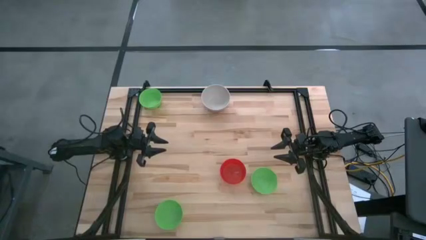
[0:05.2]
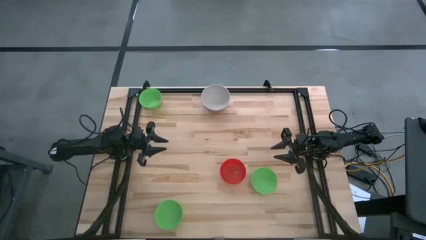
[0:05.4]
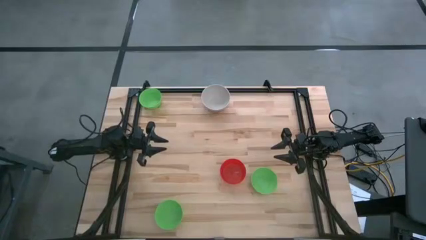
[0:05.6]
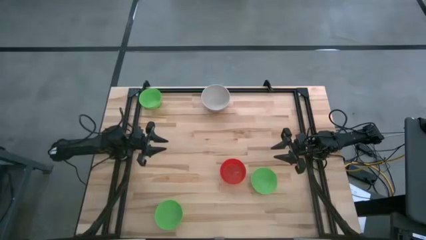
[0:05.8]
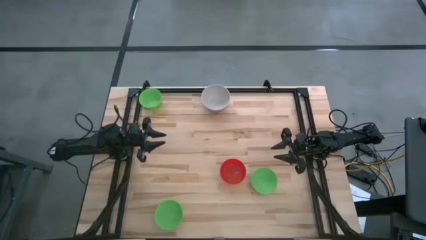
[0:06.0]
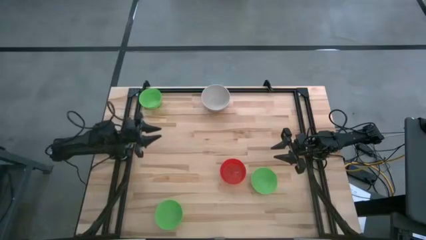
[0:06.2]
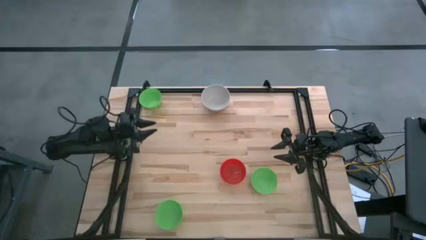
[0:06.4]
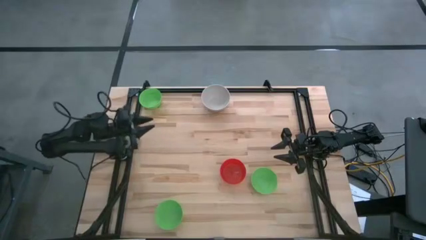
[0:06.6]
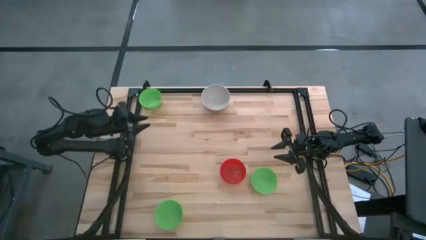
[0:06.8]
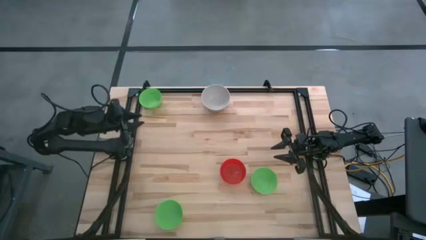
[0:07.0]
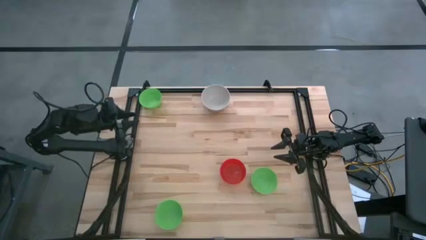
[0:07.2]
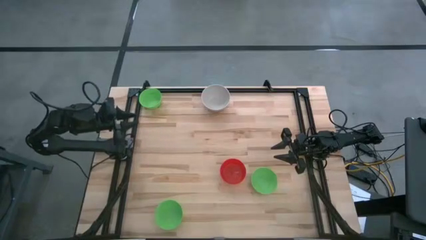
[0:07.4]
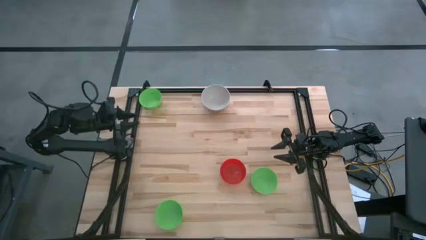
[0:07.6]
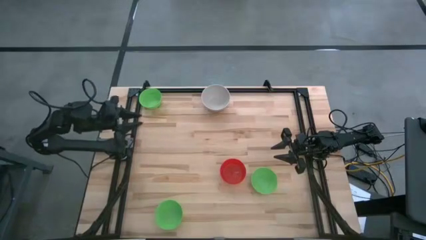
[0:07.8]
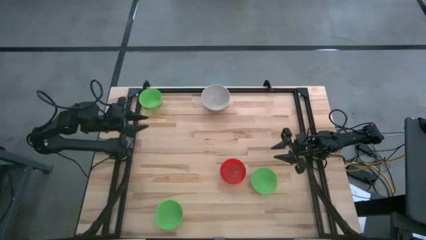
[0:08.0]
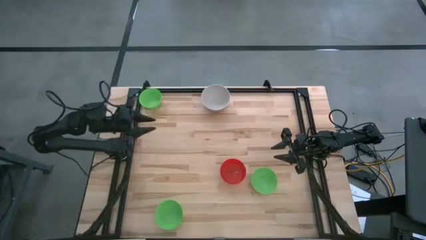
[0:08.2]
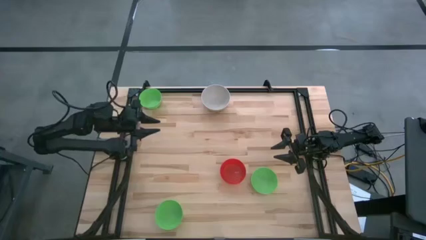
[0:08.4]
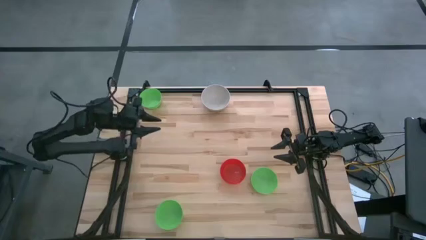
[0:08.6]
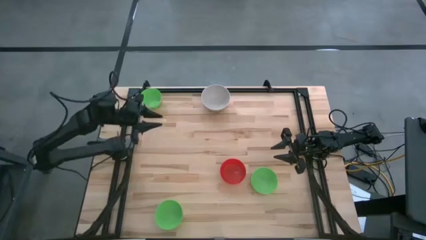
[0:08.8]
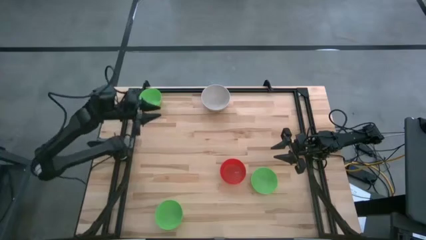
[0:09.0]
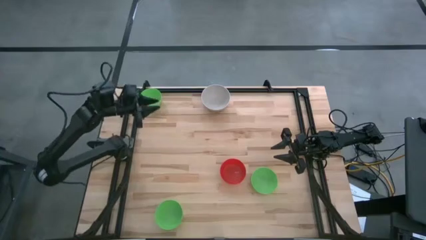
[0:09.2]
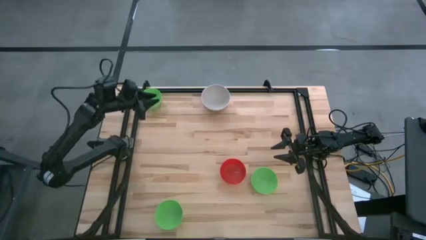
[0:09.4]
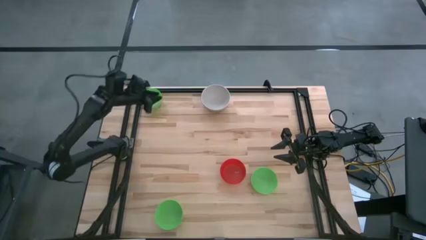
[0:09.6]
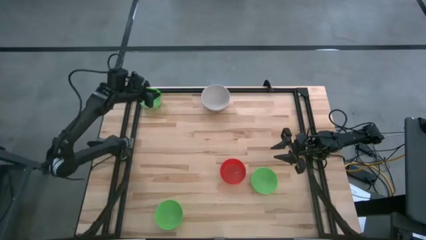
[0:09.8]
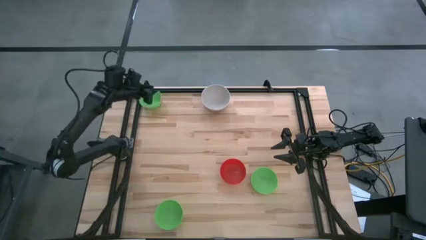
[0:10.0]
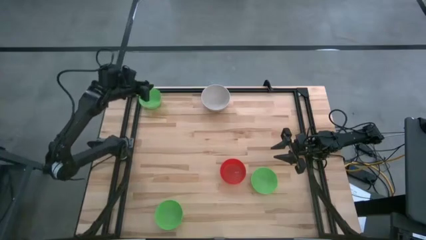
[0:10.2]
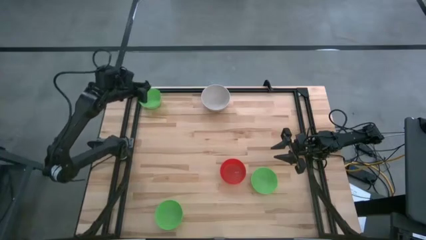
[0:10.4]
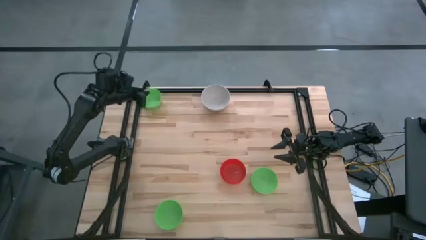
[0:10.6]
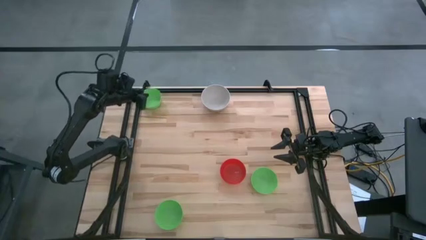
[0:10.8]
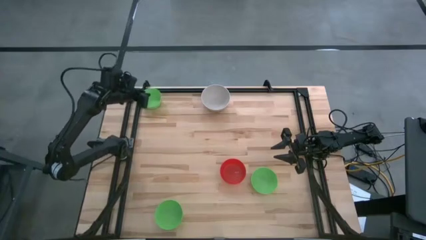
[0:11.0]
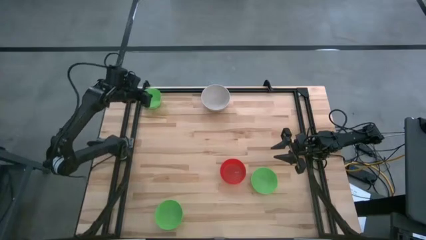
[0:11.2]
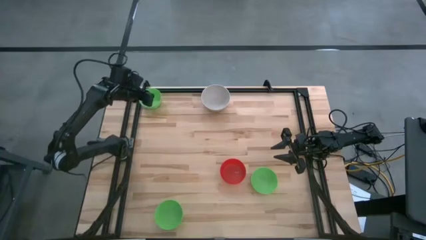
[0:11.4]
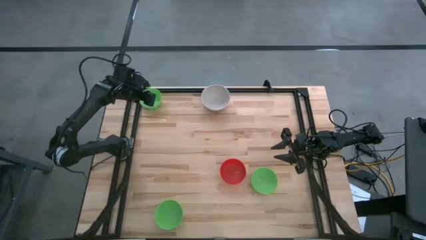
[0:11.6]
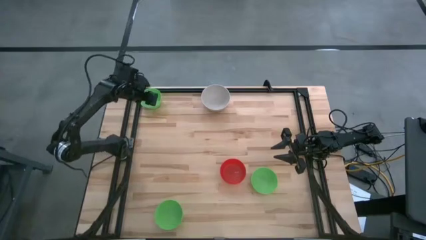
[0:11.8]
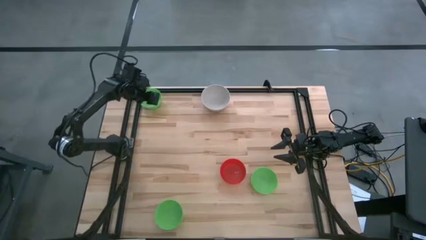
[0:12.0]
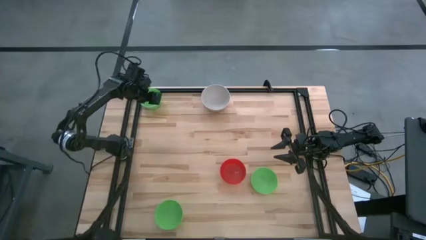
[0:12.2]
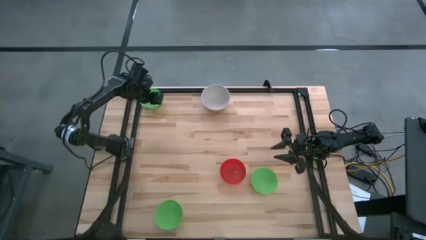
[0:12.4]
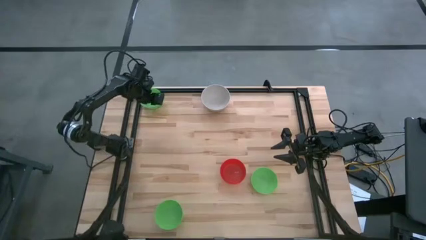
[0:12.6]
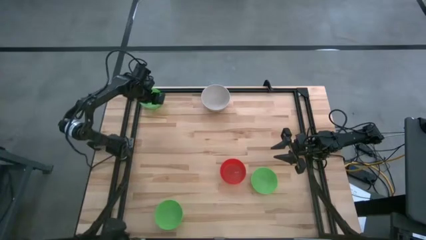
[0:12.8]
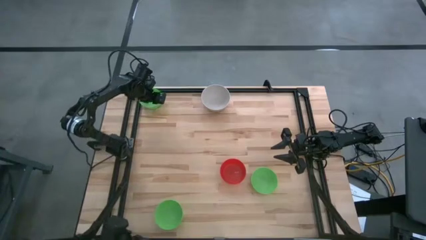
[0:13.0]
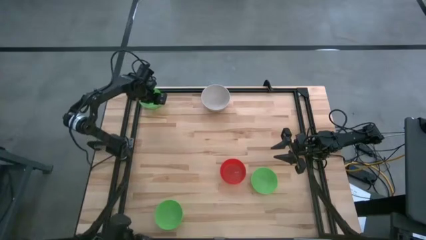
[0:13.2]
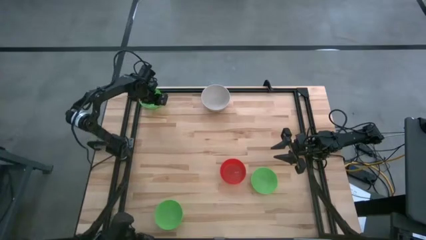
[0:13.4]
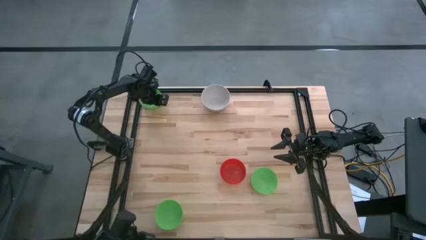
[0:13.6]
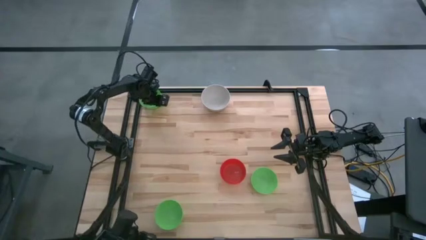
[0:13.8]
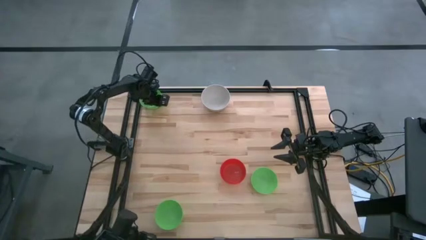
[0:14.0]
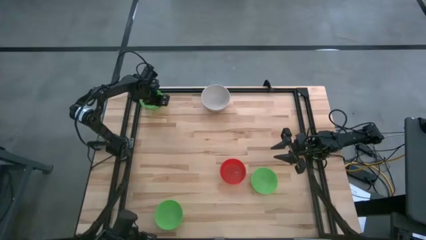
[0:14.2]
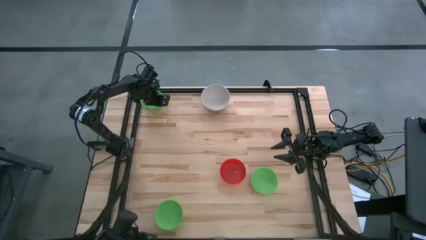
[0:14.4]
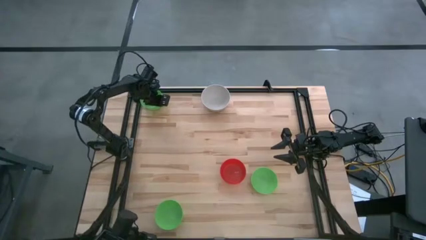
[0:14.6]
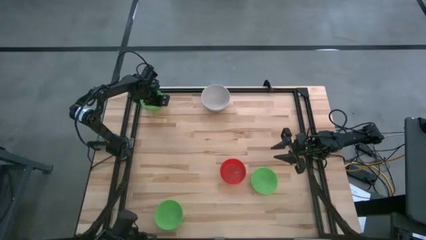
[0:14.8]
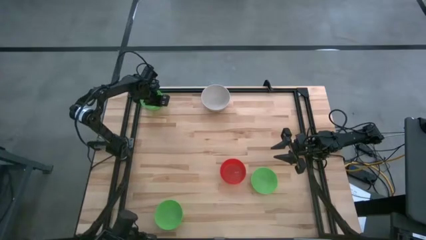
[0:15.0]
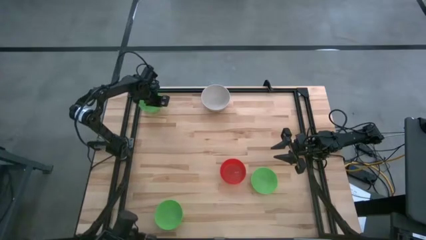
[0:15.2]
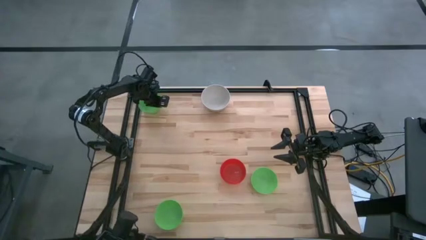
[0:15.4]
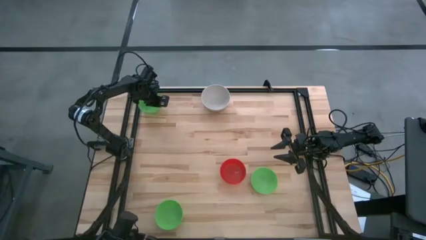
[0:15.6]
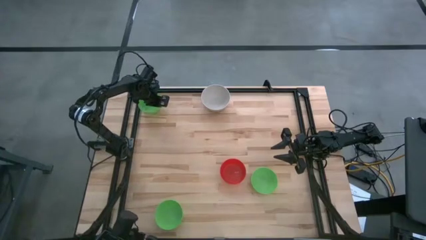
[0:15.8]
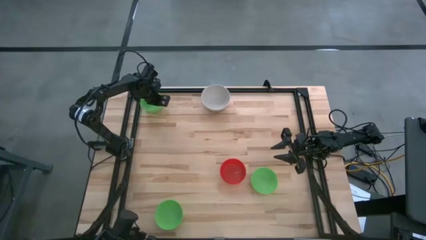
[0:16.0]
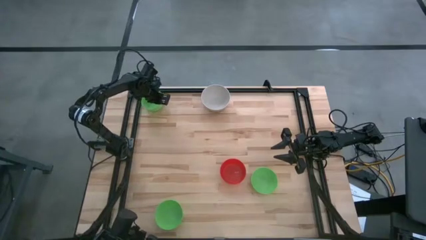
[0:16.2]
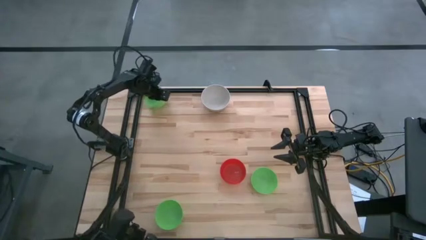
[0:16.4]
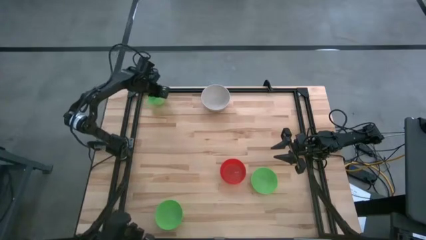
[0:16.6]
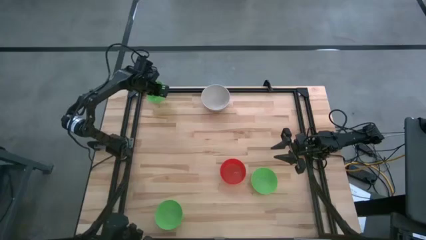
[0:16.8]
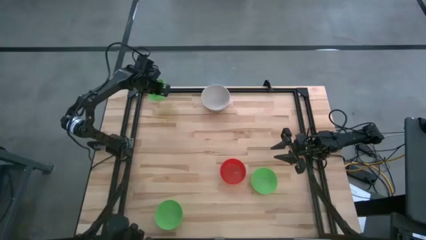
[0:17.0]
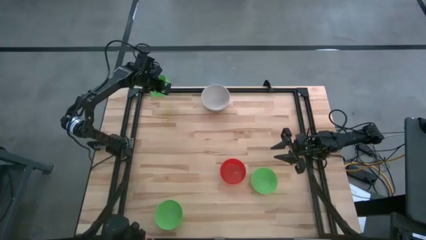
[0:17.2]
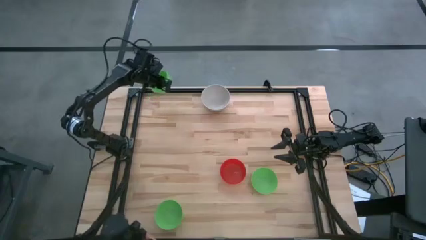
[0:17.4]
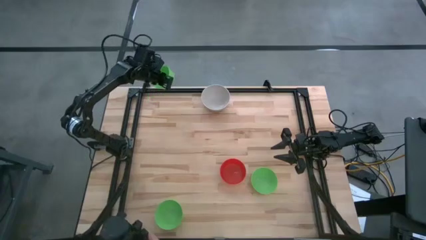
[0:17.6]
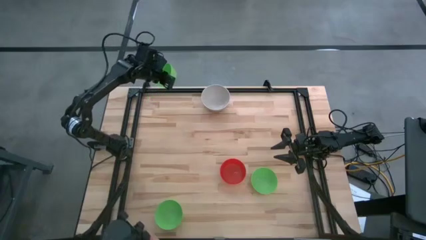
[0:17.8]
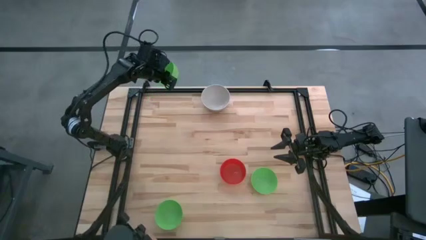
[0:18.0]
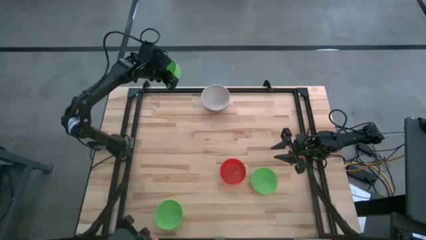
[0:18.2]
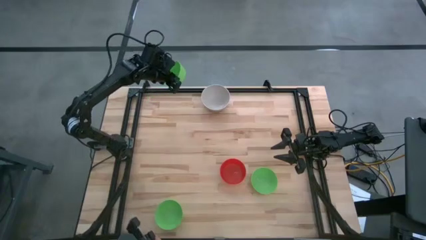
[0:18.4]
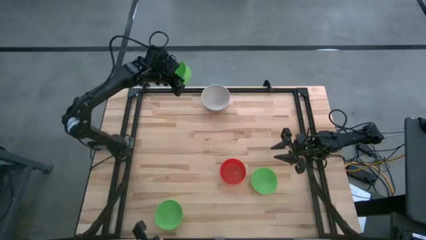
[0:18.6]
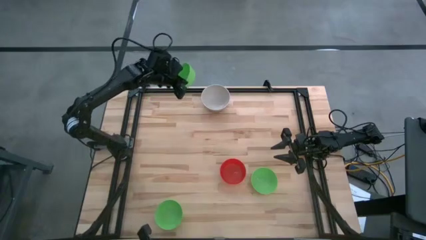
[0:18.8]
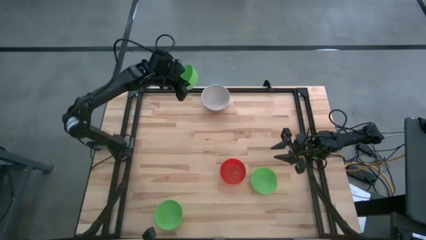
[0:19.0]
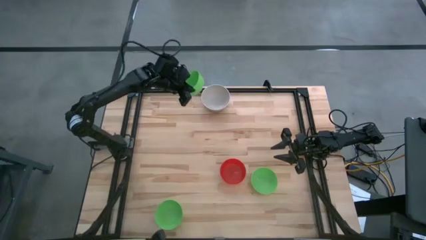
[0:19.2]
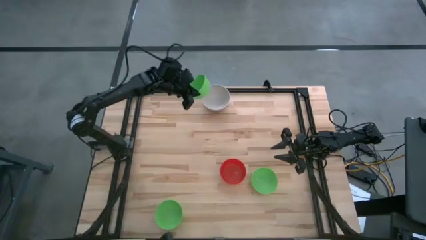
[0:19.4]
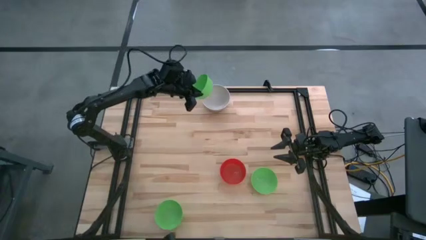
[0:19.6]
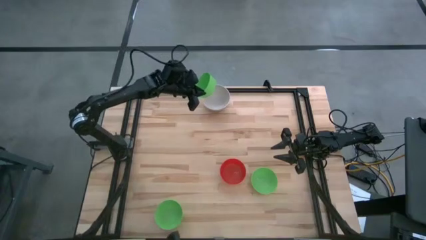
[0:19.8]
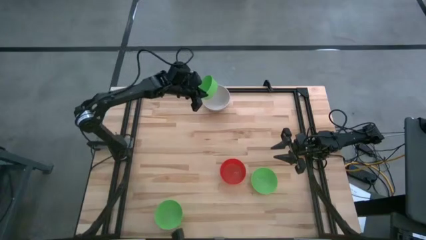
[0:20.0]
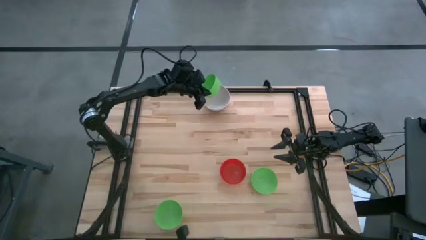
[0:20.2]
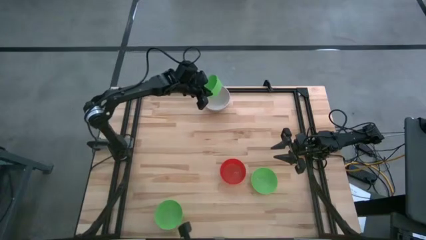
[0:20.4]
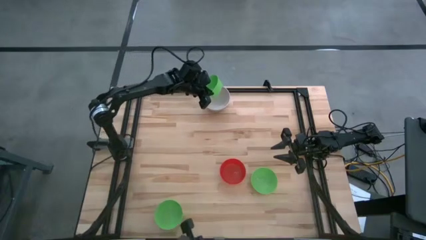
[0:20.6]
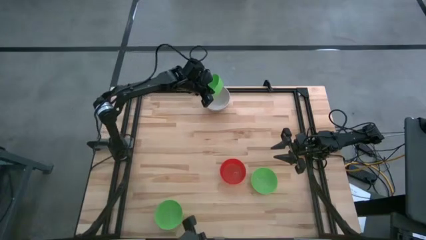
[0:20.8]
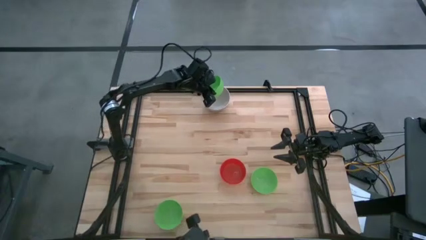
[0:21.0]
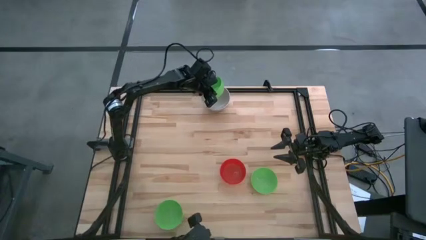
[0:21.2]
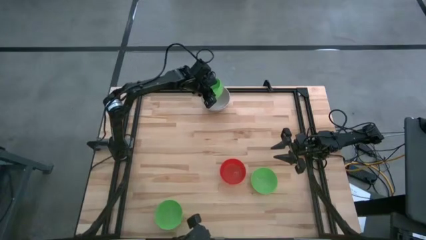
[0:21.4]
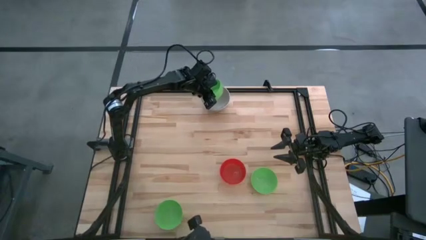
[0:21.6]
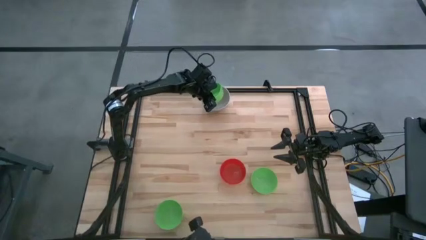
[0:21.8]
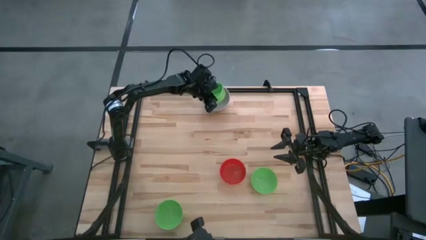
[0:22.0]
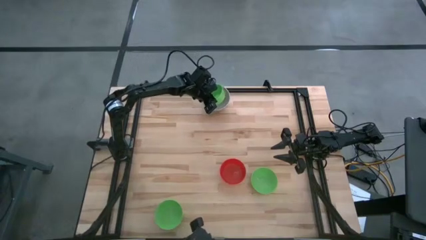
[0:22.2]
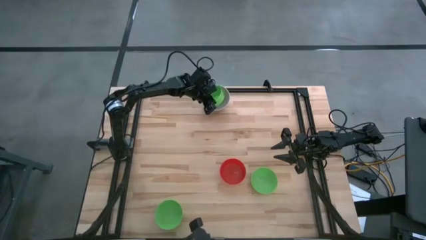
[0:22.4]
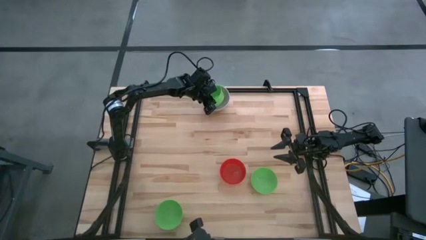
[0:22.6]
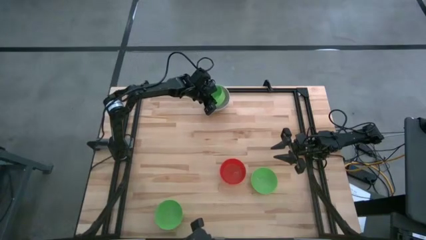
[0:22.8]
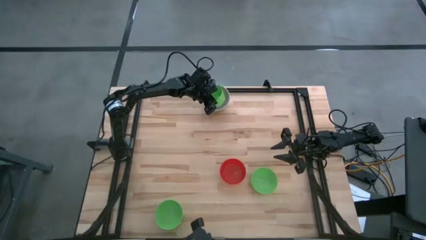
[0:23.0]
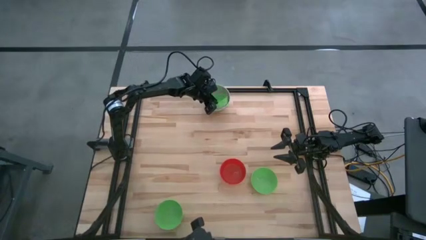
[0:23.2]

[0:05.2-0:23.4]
Stack the top green bowl on top of the white bowl
